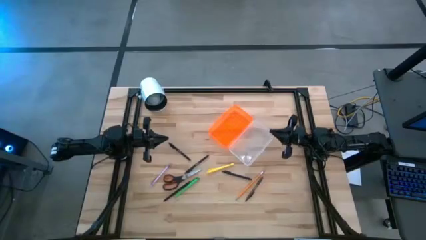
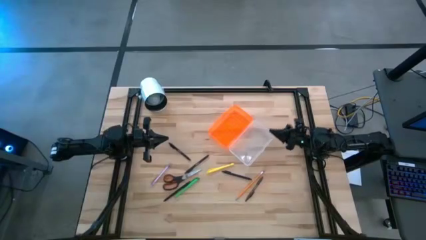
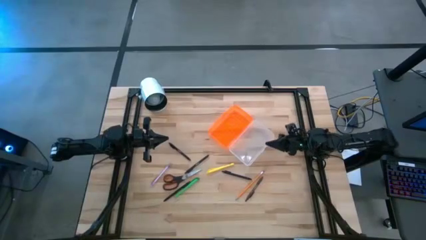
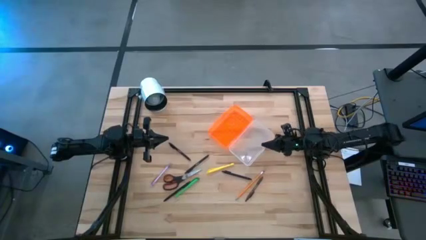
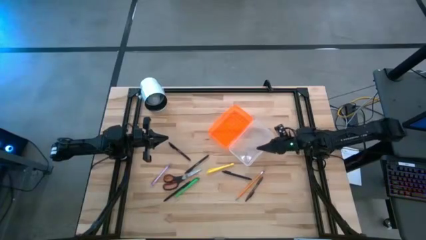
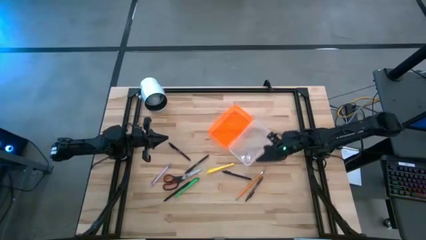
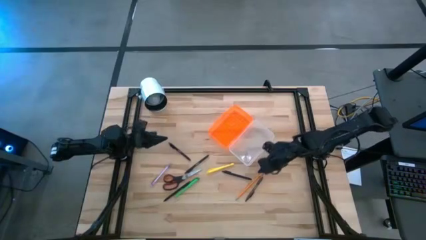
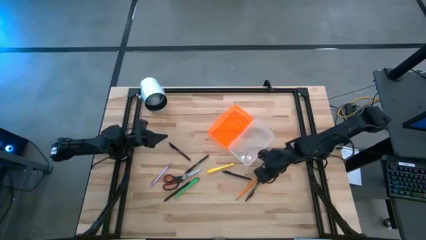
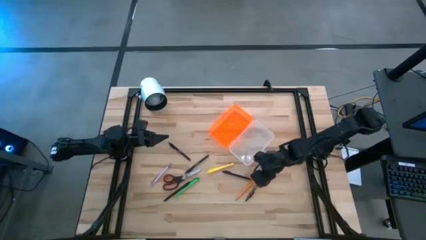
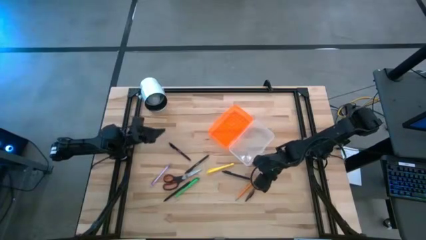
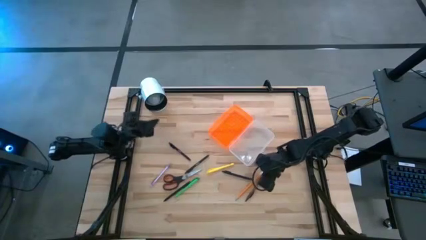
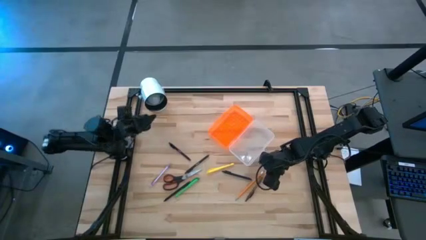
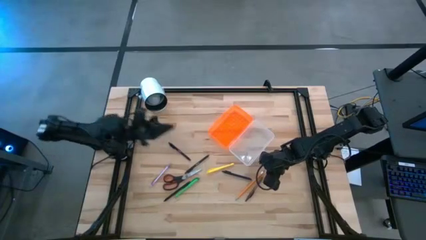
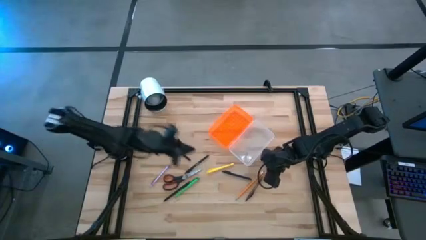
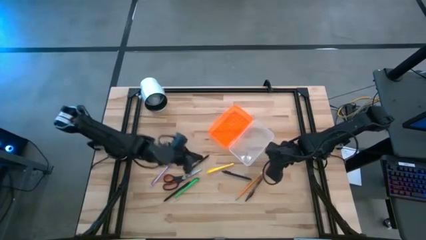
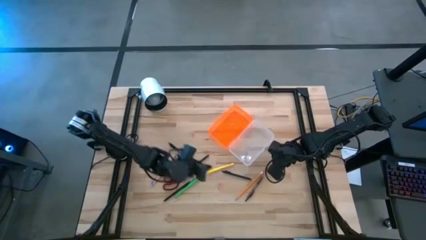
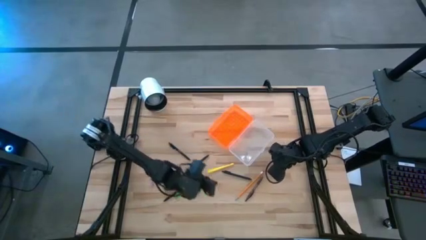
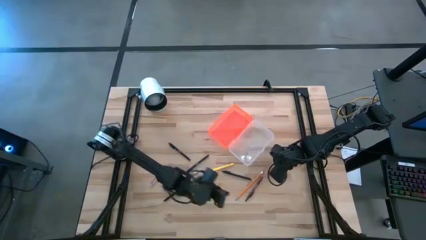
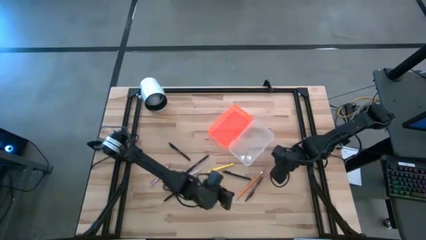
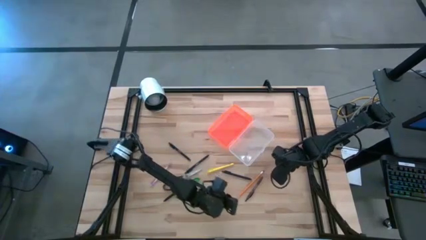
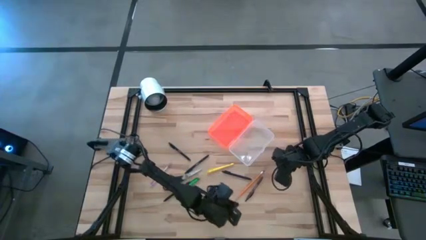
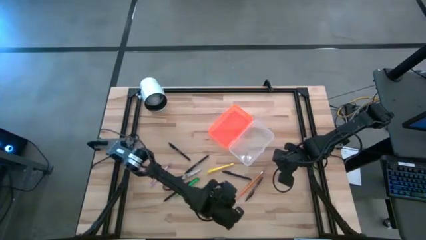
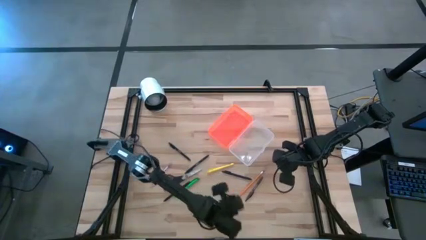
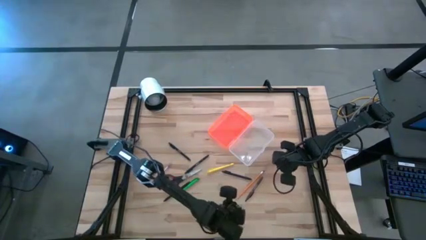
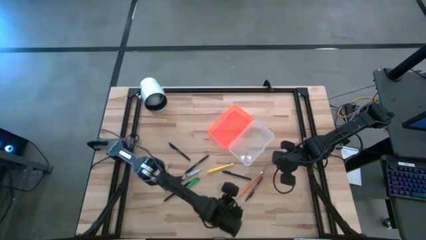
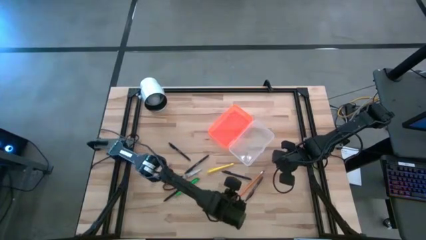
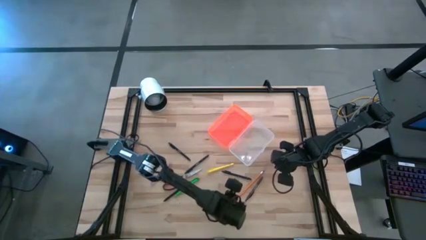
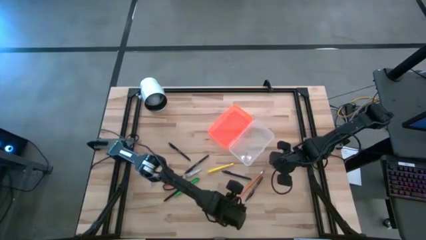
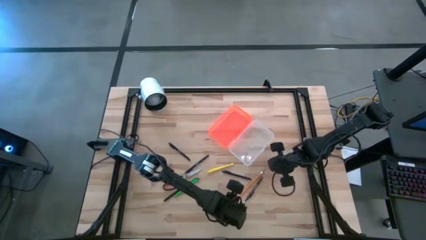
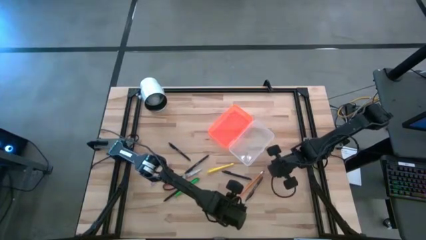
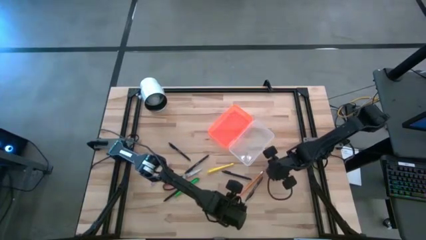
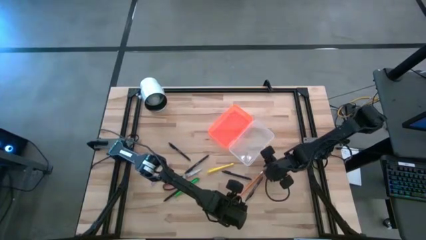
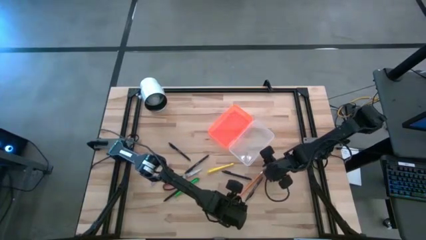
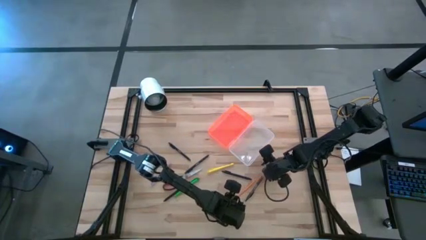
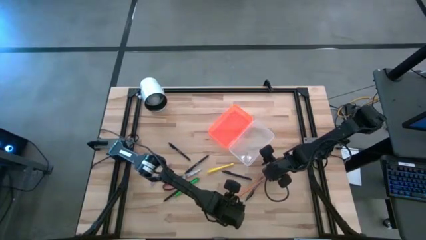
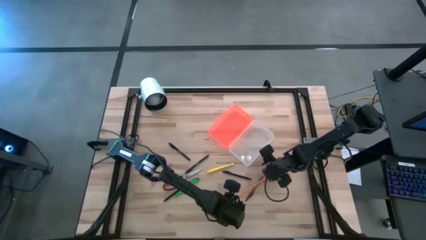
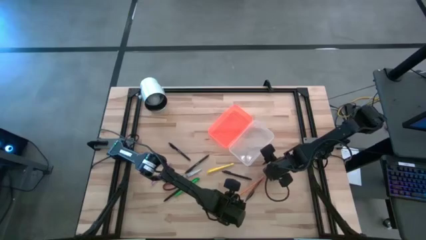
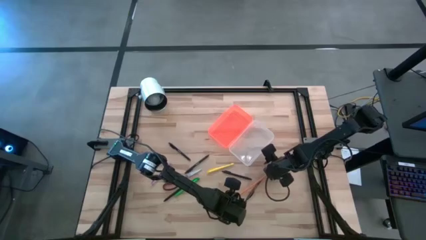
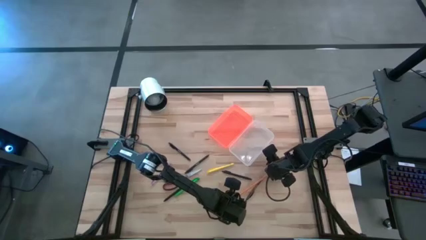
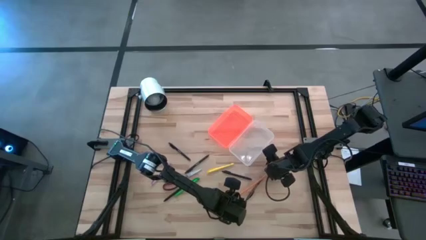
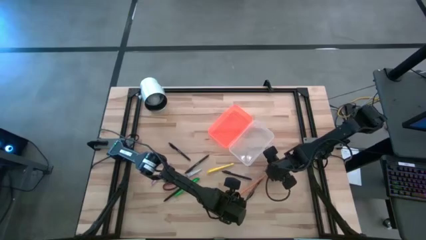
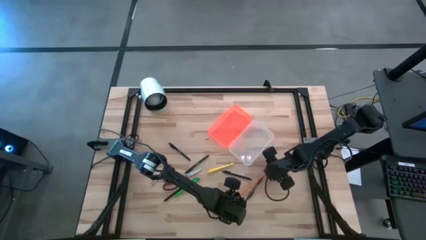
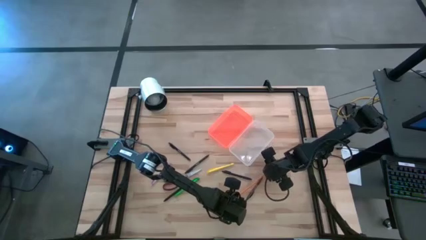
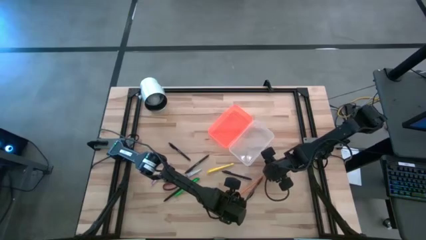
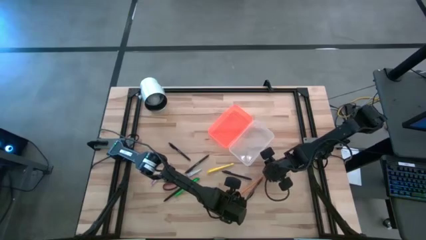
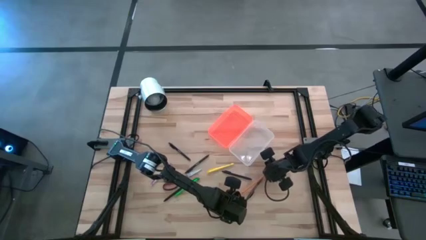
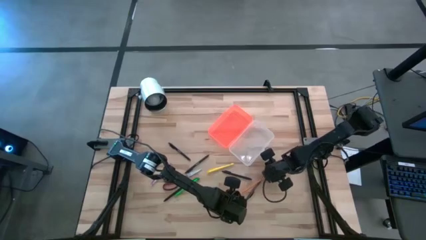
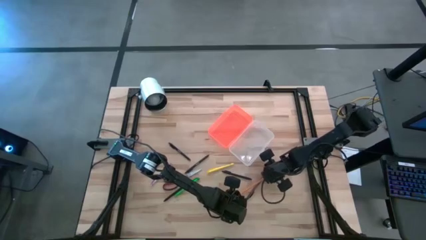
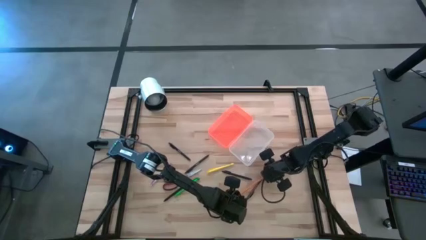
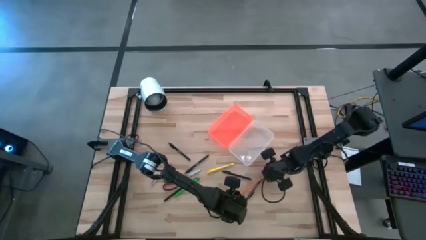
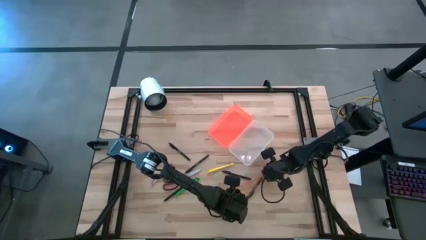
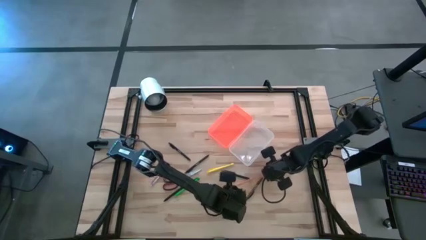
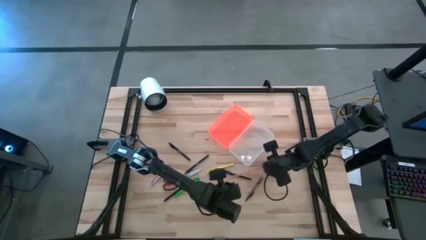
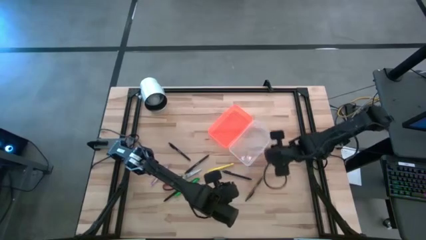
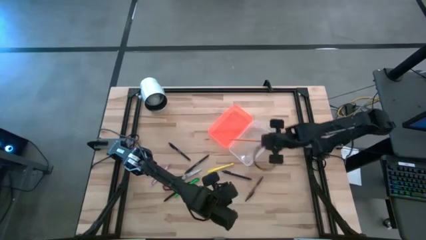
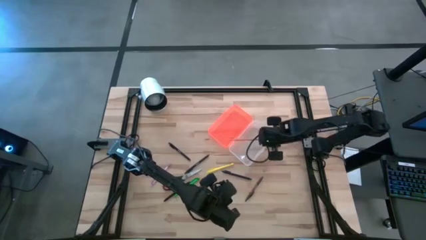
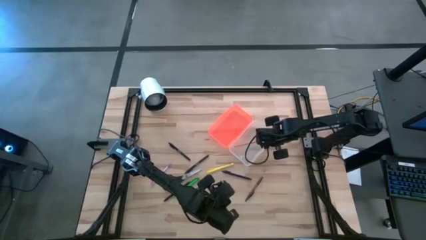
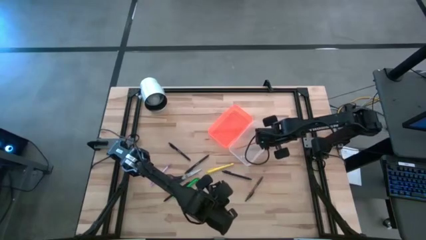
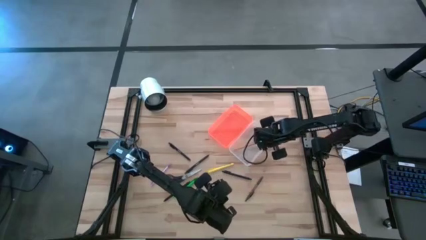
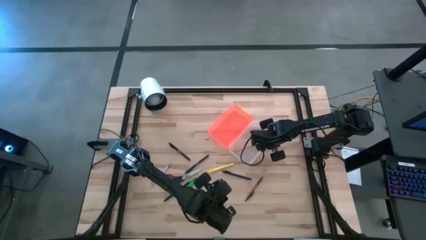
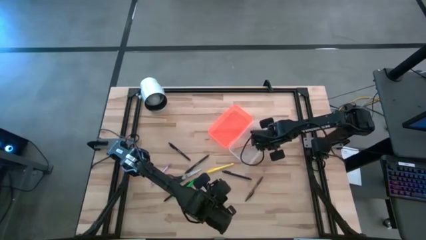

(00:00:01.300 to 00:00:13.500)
Task: Pick & place school supplies into a supply box
Put the orange pencil into the orange supply box

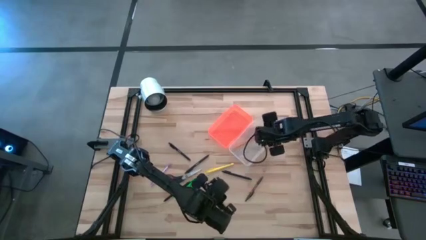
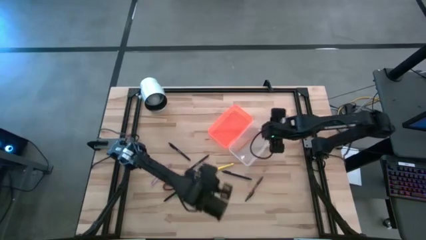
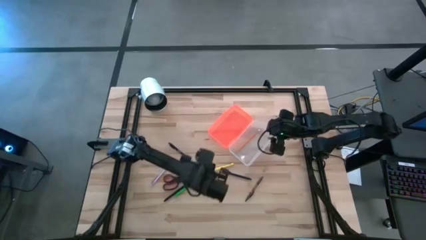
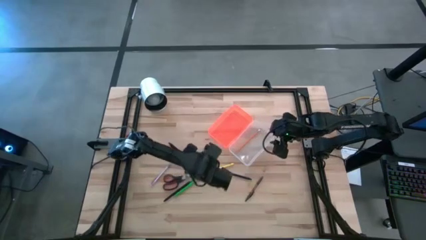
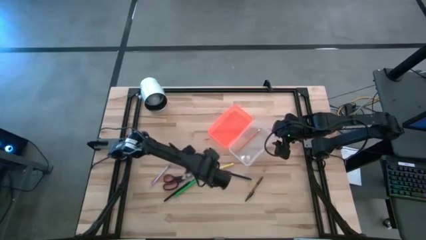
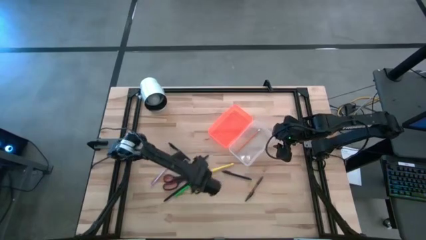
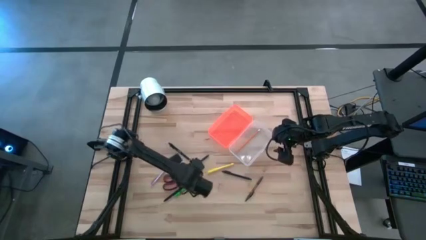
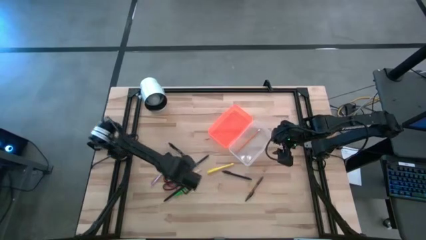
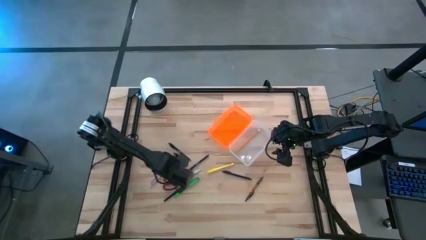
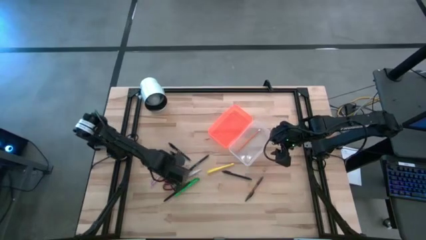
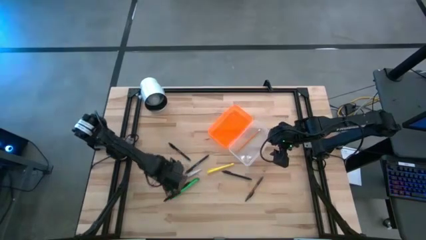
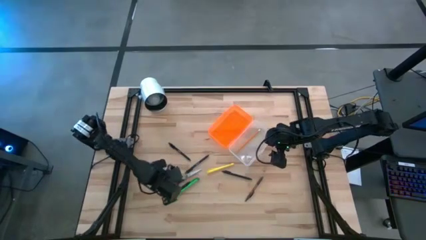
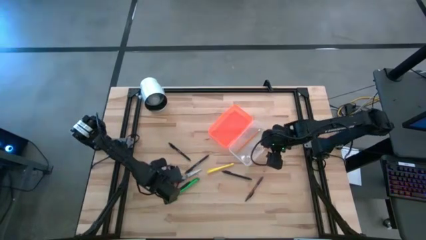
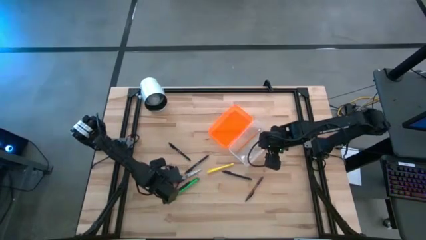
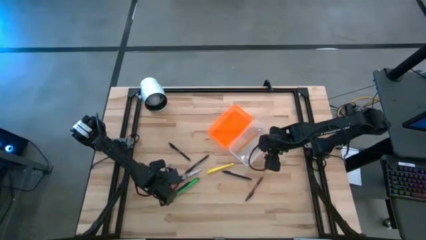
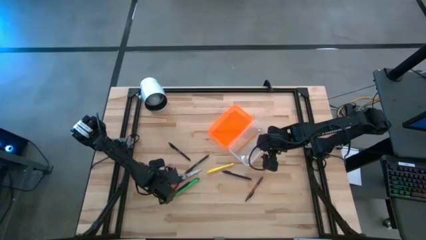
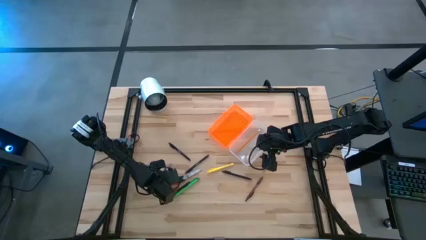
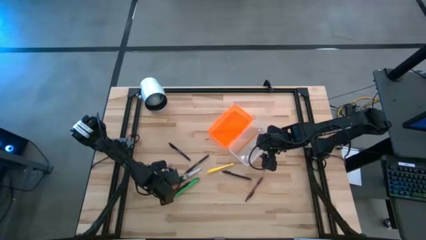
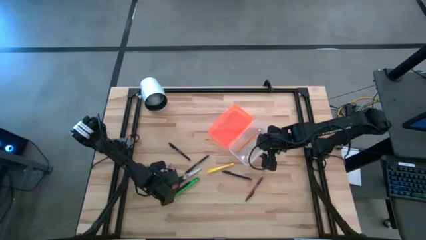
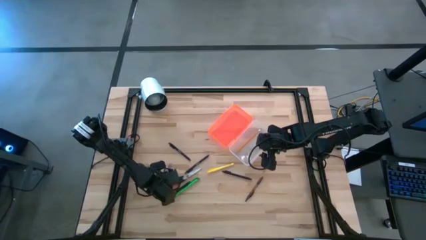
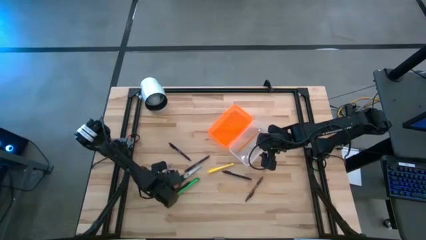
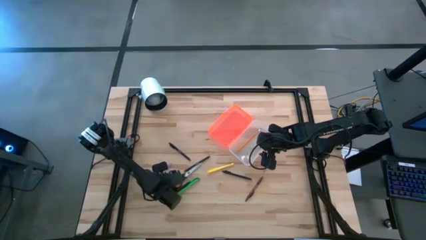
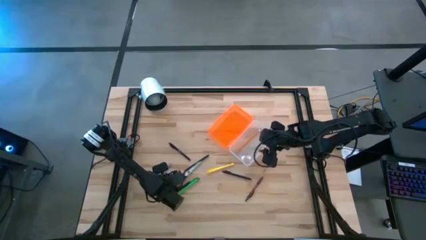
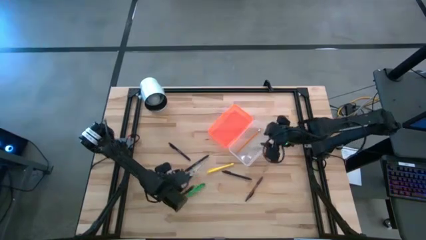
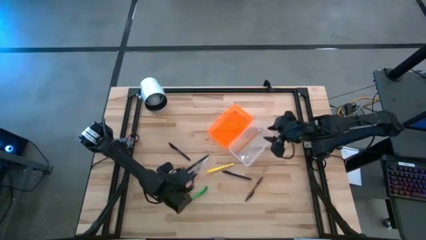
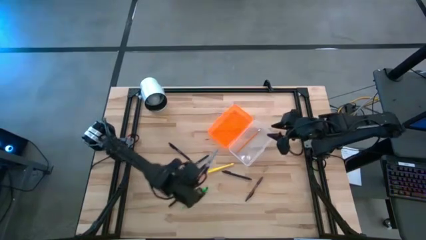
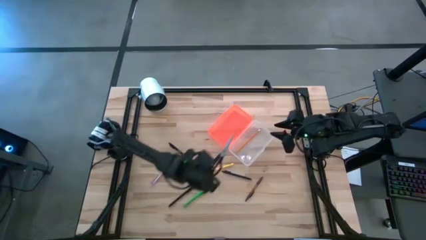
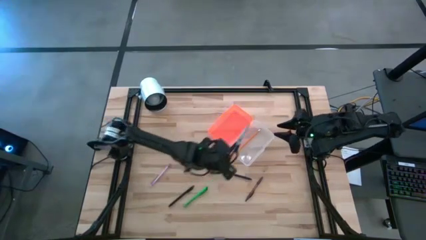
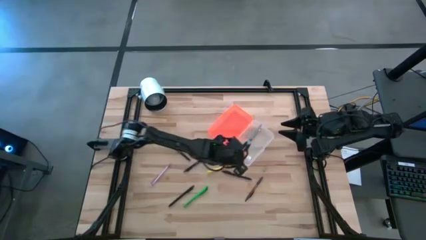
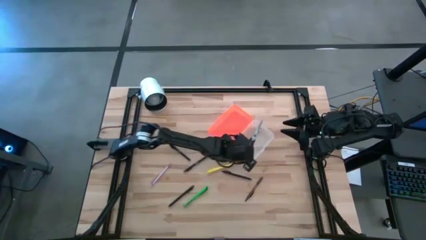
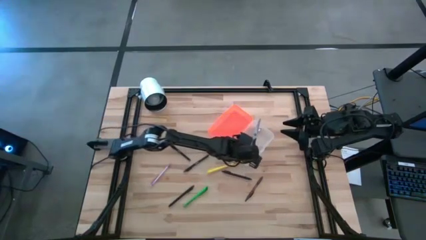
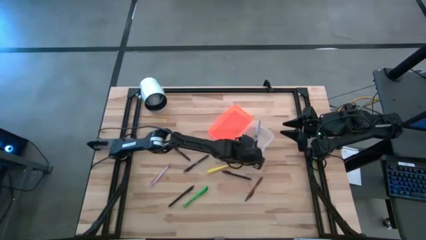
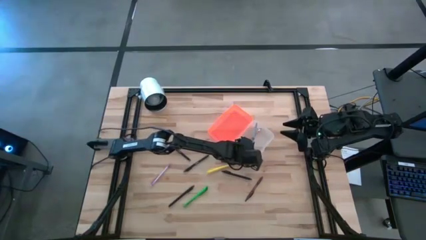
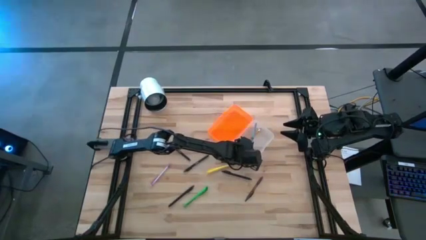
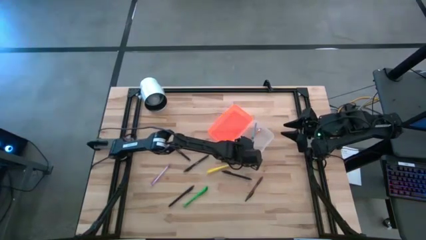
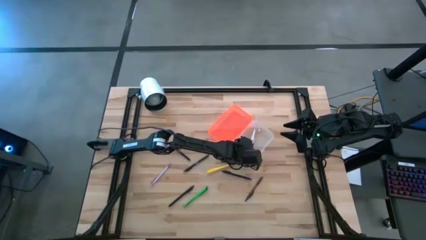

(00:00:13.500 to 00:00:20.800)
Put the black scissors into the orange supply box
